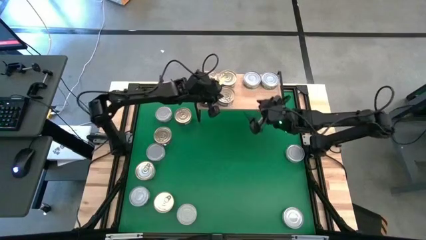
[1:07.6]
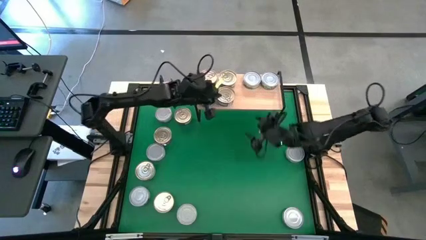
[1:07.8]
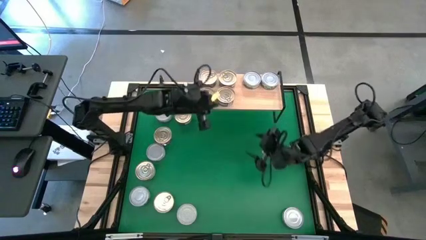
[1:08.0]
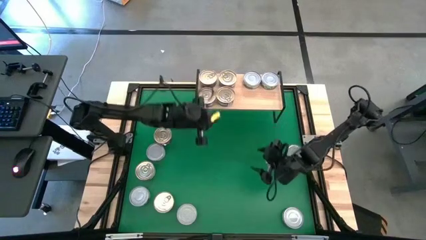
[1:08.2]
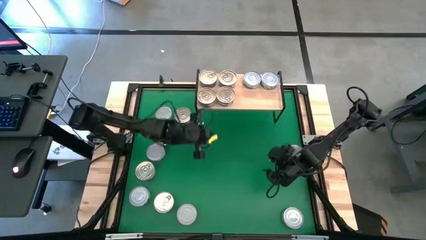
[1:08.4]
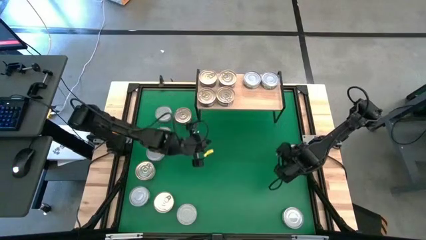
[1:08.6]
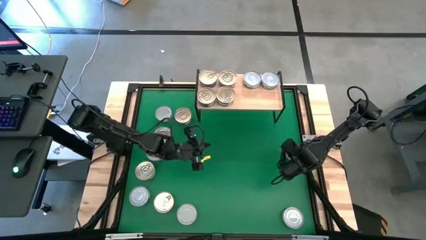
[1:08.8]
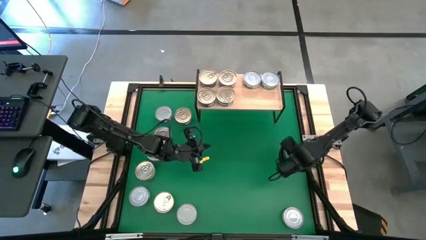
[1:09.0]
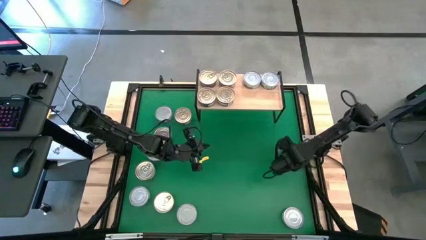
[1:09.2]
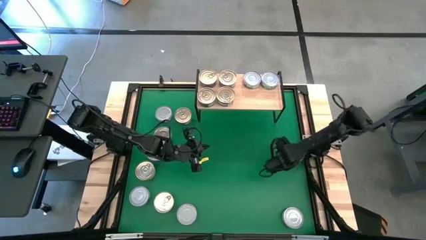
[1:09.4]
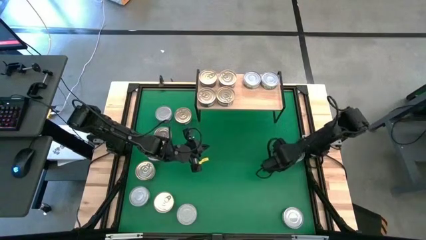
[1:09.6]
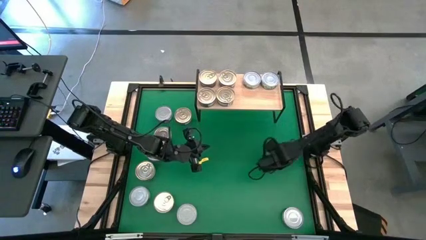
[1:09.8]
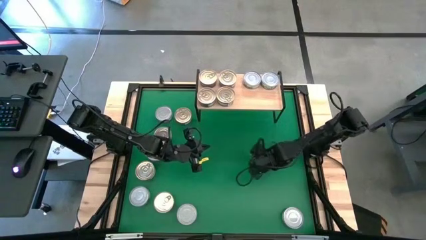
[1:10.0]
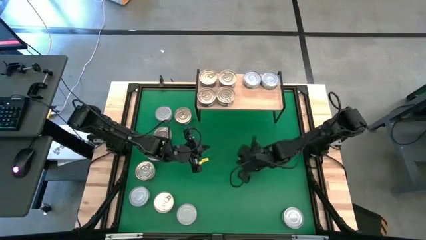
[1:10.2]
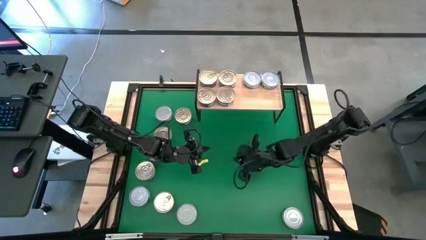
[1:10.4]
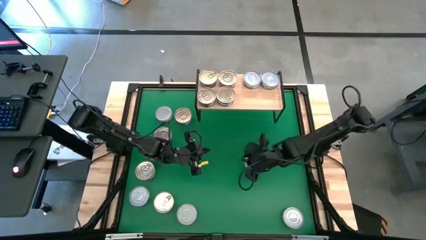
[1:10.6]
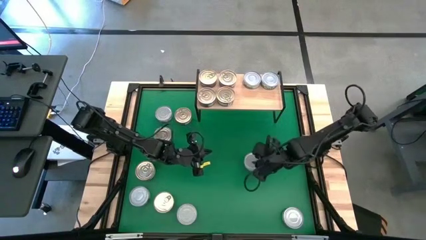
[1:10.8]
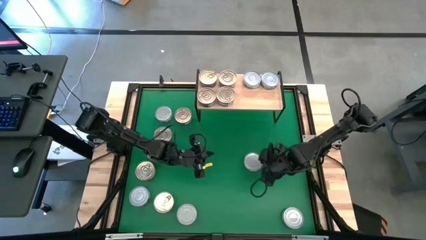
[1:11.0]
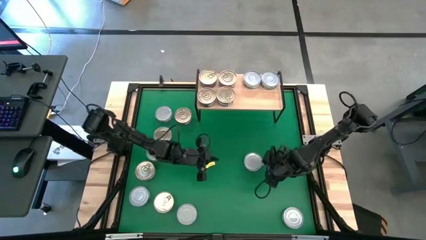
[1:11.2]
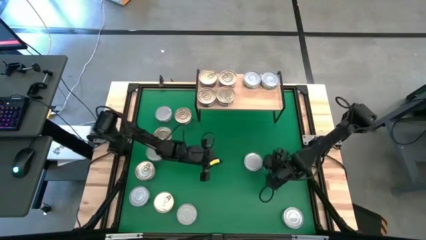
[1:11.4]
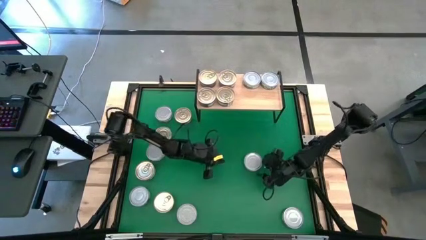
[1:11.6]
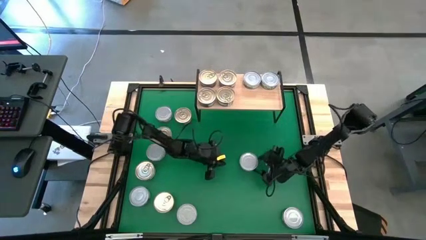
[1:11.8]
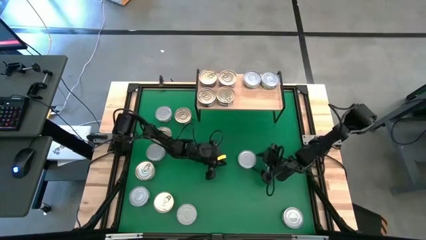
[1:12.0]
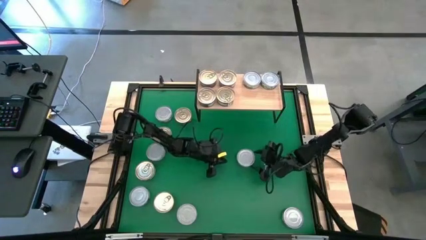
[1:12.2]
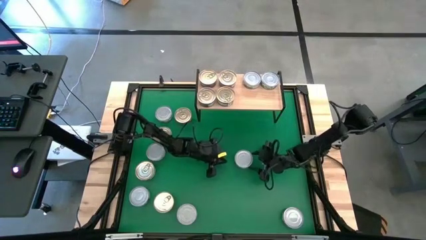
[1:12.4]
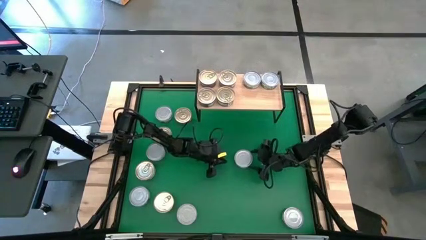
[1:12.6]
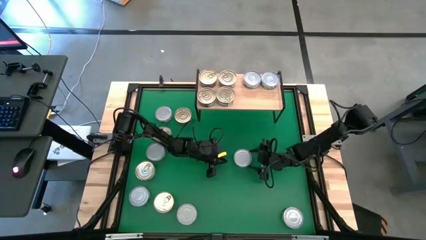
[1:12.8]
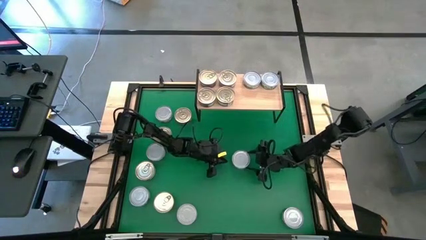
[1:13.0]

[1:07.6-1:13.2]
Task: Stack canned seafood by type on shelf
Put the green tuna can on the shelf and aligned with the top left green tuna can

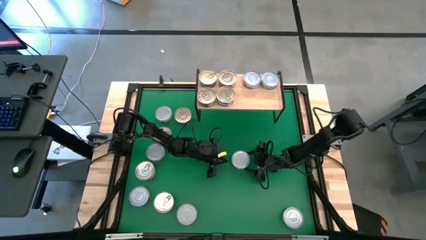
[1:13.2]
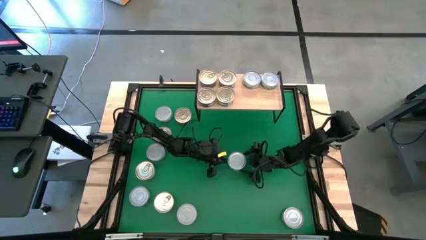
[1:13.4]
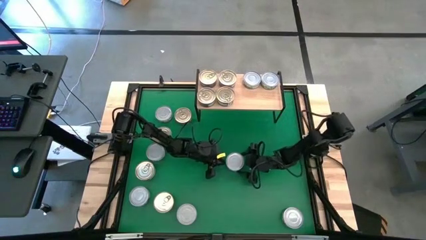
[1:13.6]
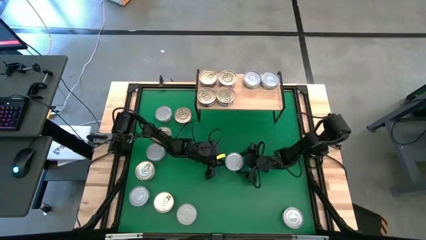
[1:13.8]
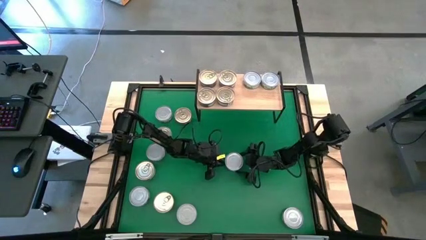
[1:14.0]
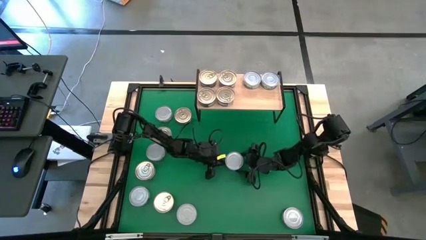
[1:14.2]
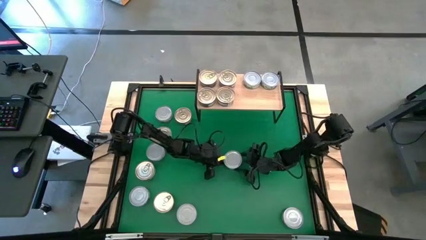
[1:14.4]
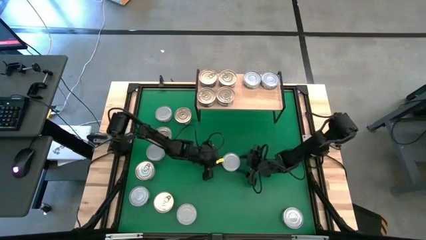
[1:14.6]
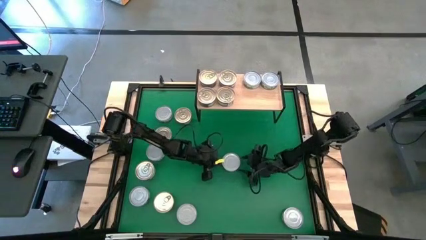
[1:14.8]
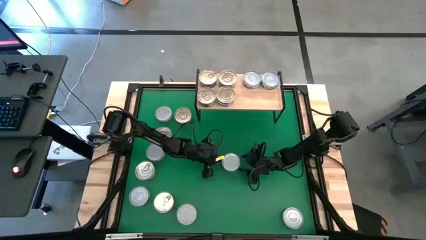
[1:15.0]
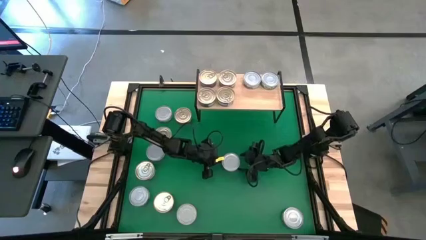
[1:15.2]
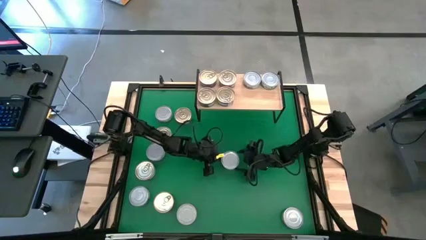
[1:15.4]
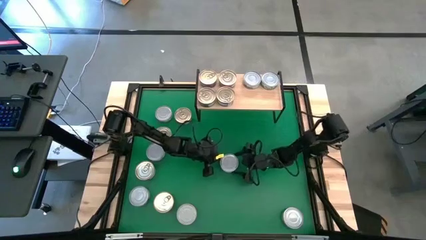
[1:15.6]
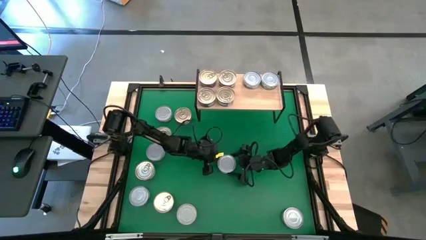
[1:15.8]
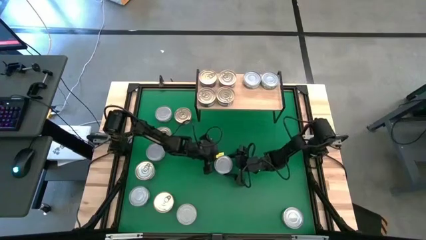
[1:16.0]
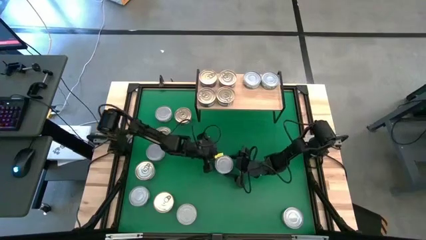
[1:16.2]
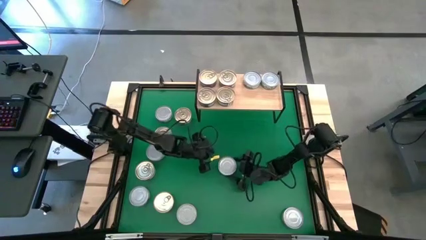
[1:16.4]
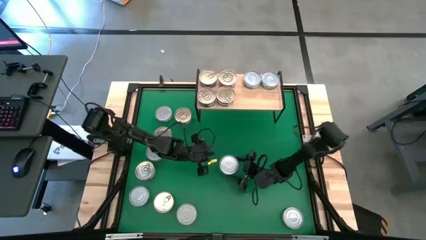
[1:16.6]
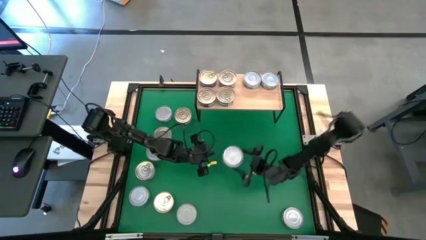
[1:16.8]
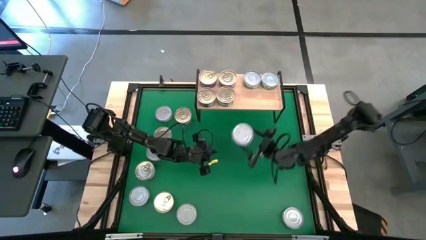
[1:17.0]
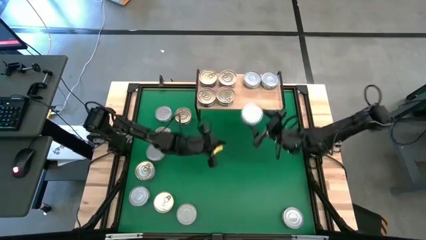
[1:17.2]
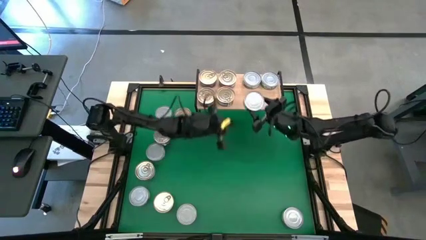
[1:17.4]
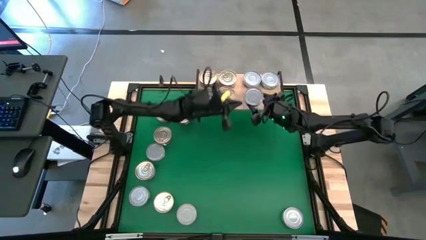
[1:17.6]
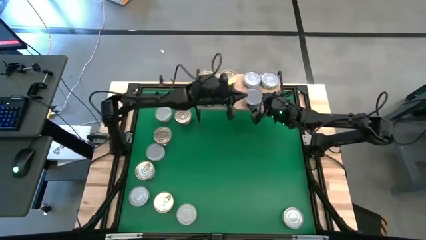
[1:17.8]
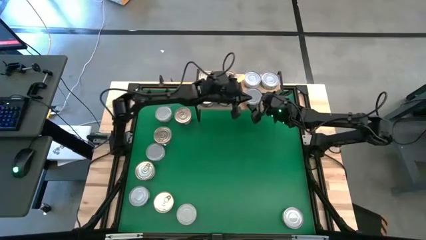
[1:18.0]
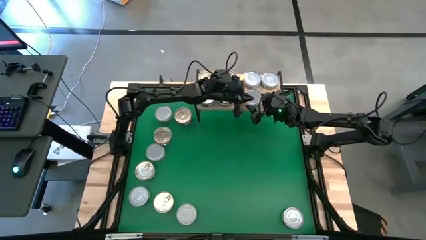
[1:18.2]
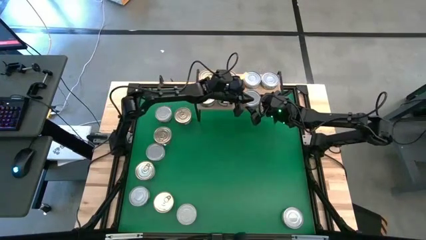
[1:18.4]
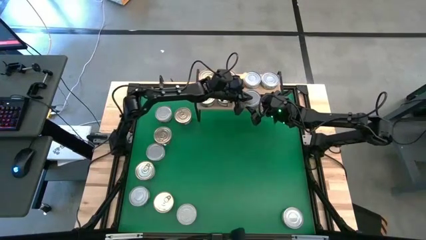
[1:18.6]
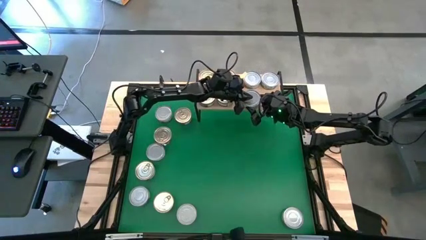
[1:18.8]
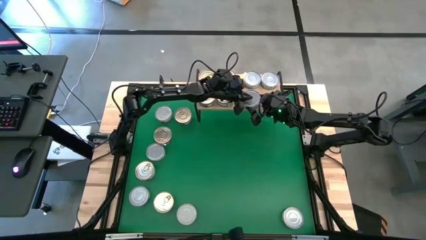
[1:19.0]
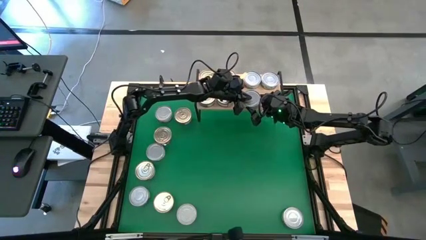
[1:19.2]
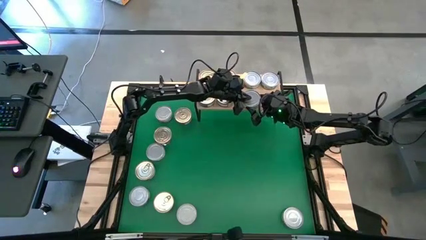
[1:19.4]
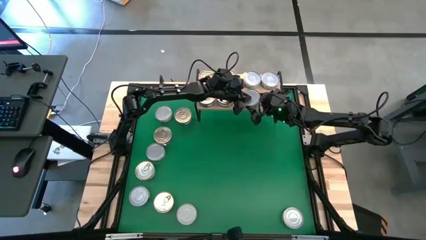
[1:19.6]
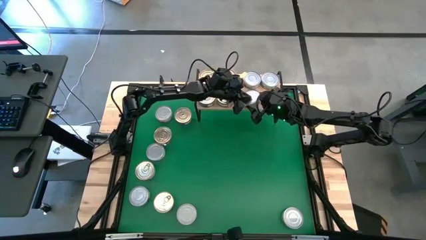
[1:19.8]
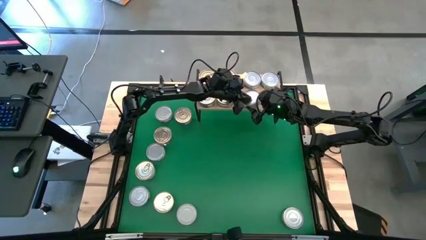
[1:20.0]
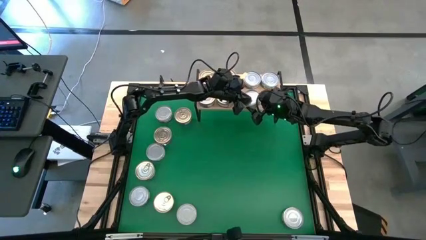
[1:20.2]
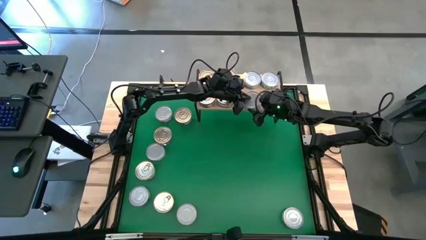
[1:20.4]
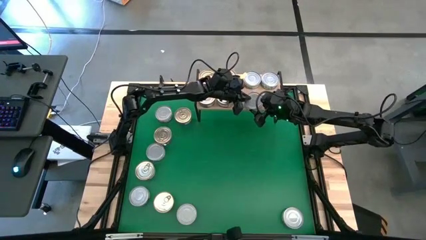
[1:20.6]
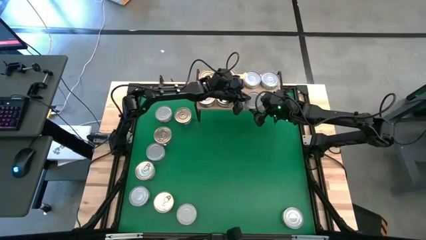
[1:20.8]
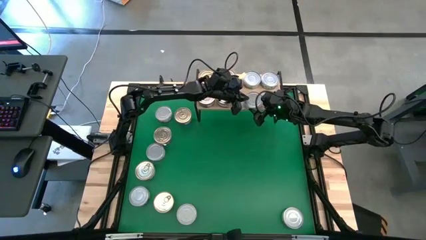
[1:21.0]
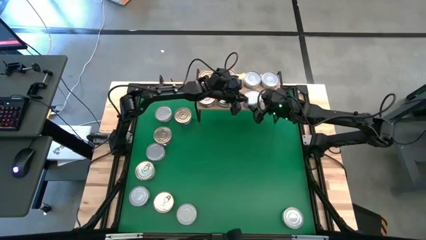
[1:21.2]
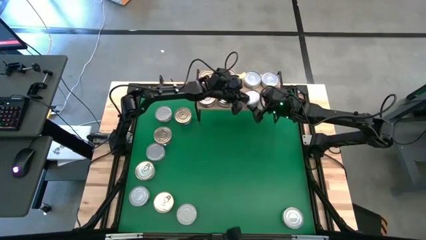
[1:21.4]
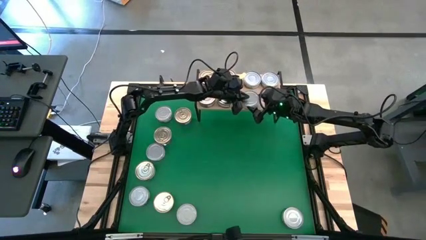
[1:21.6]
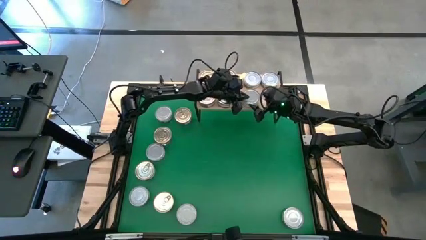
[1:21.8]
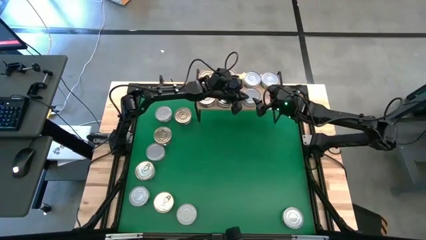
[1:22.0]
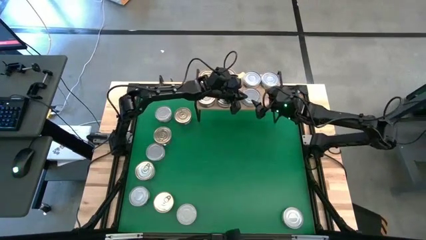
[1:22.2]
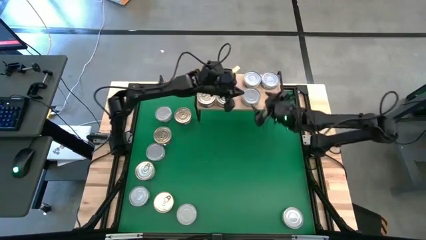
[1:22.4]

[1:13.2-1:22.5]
Put the green tuna can on the shelf and aligned with the top left green tuna can

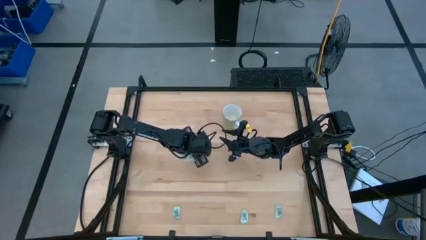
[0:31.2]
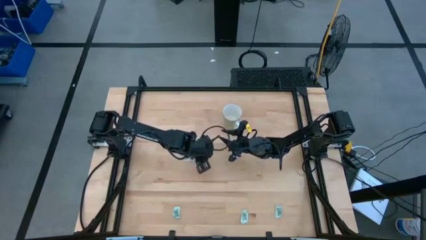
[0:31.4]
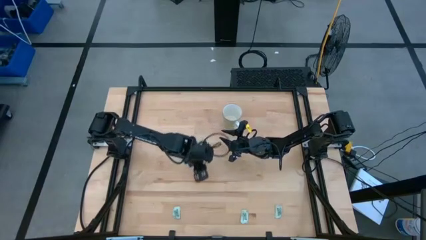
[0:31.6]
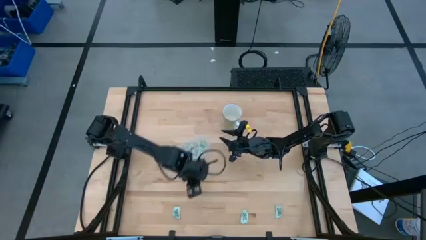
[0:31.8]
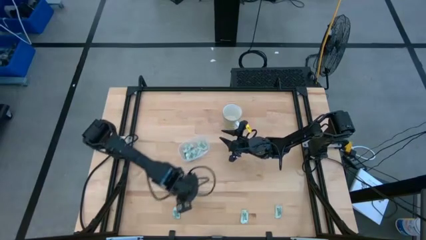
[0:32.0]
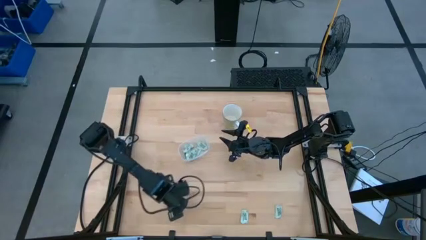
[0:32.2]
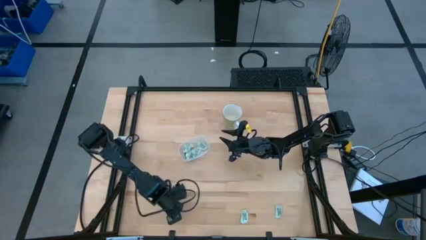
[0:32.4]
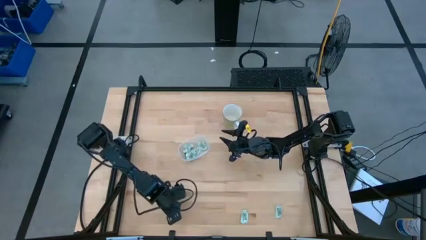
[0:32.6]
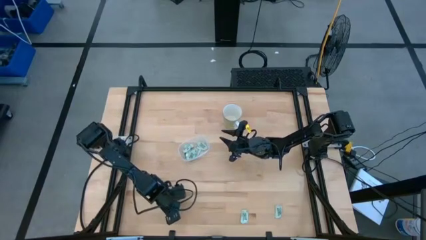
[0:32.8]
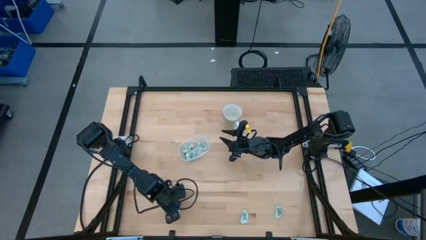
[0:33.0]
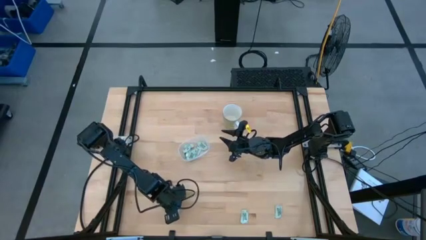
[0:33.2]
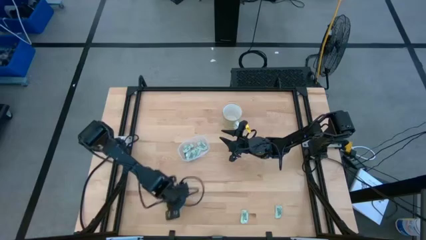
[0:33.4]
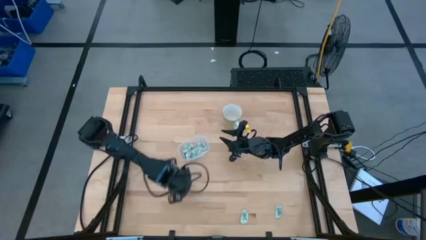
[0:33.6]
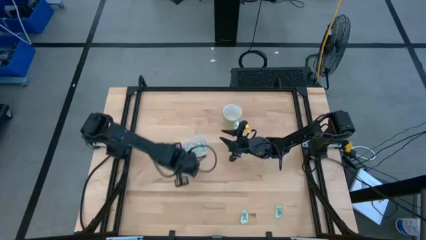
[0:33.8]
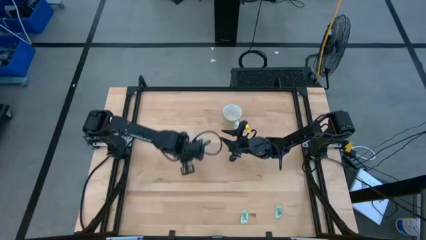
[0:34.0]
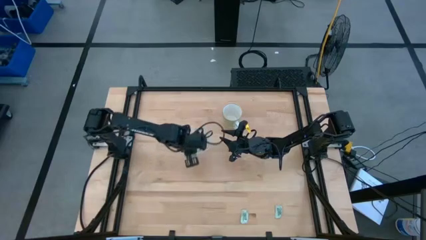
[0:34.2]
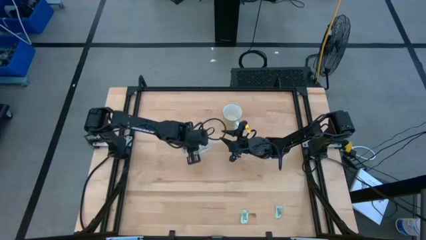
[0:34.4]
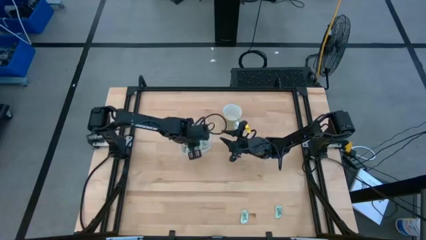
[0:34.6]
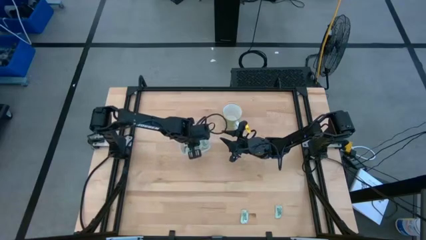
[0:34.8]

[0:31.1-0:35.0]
Task: Pick and place Stevia / Truvia into bins
Put the white stevia packet into the bin
